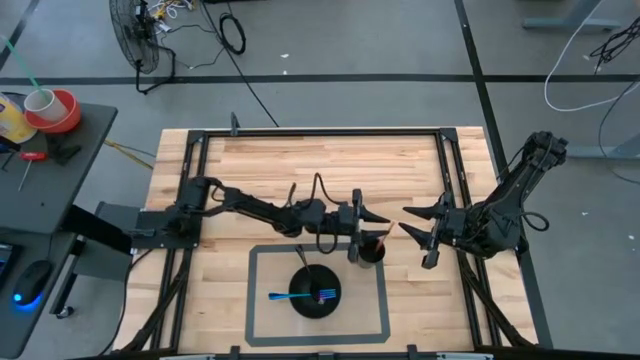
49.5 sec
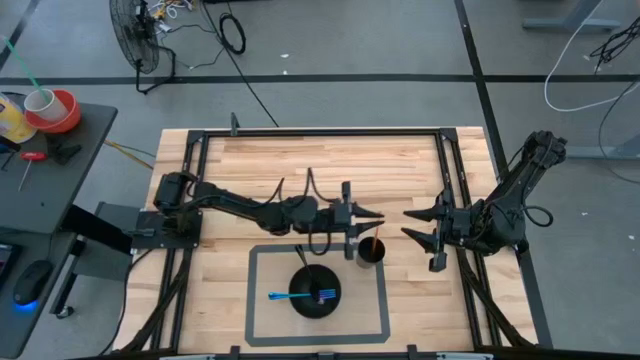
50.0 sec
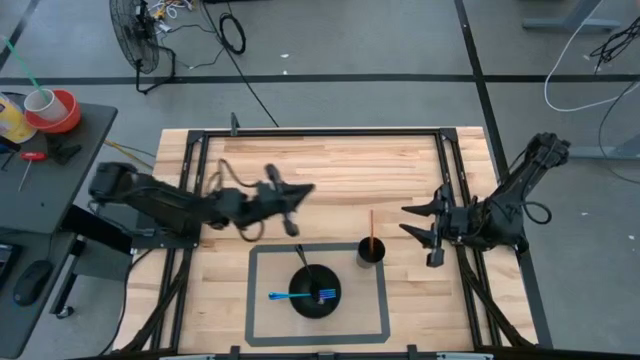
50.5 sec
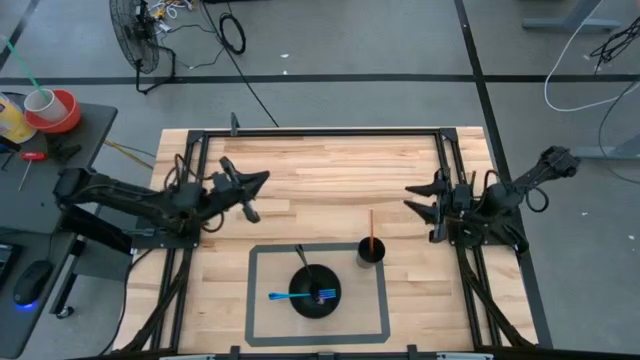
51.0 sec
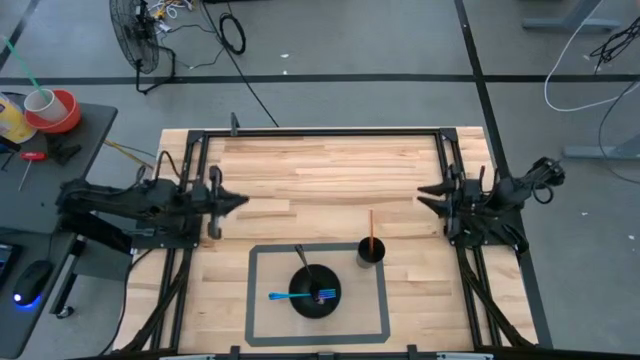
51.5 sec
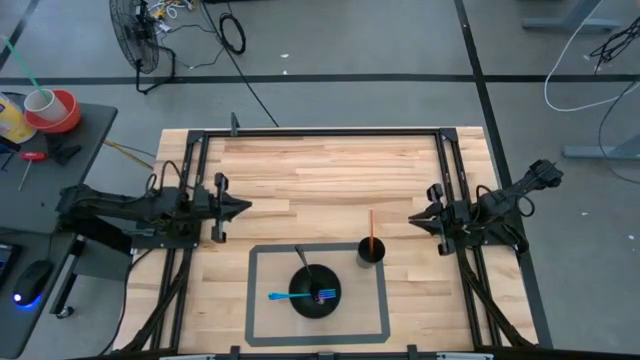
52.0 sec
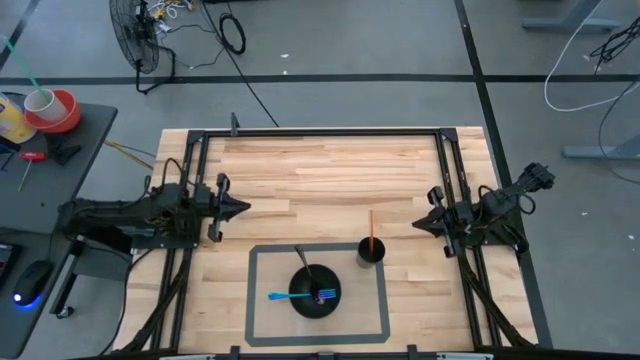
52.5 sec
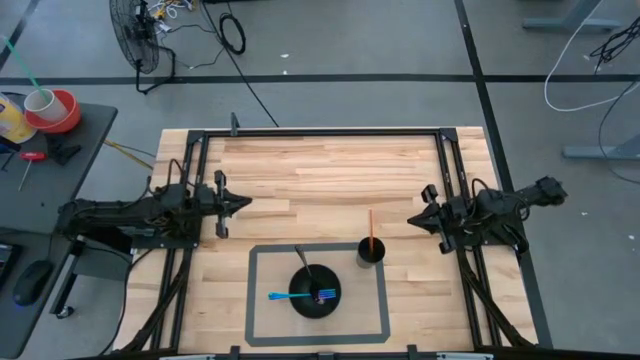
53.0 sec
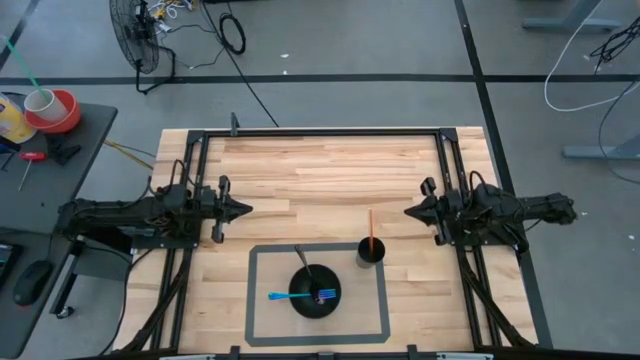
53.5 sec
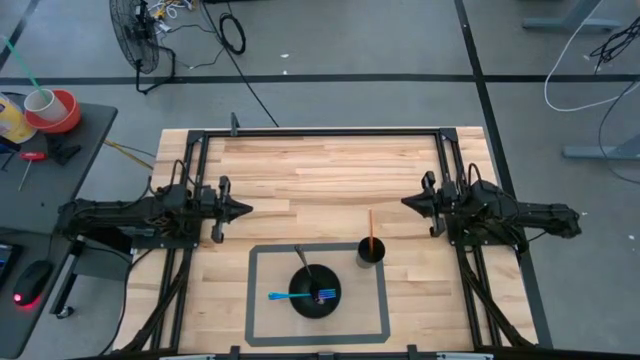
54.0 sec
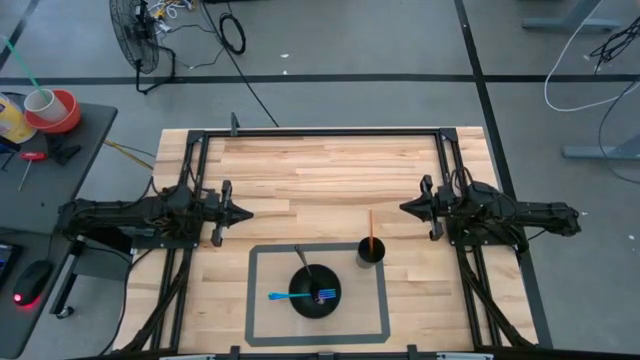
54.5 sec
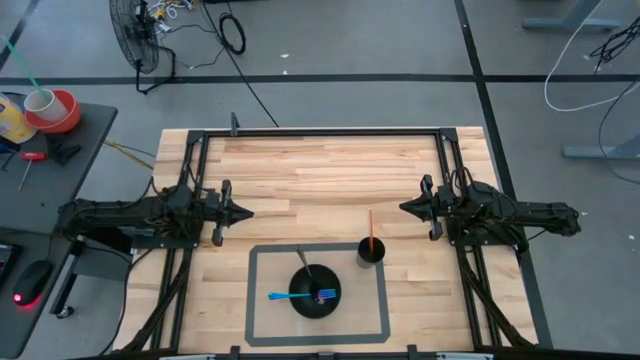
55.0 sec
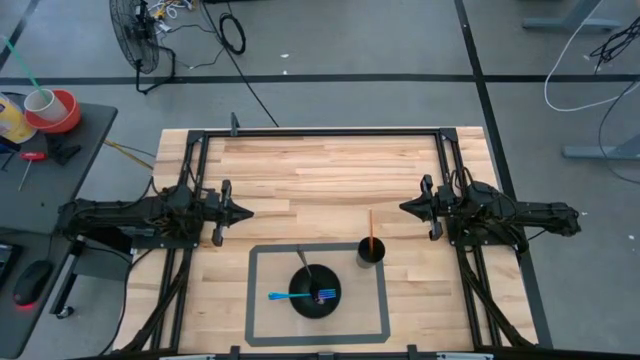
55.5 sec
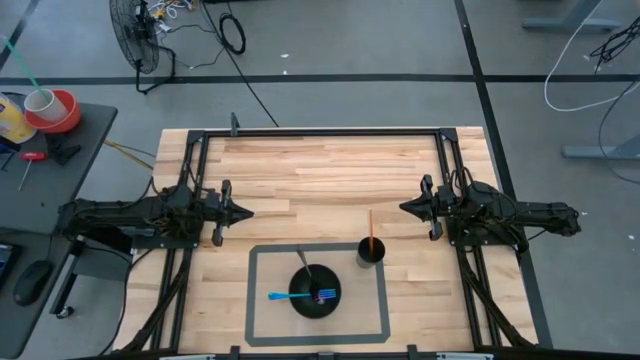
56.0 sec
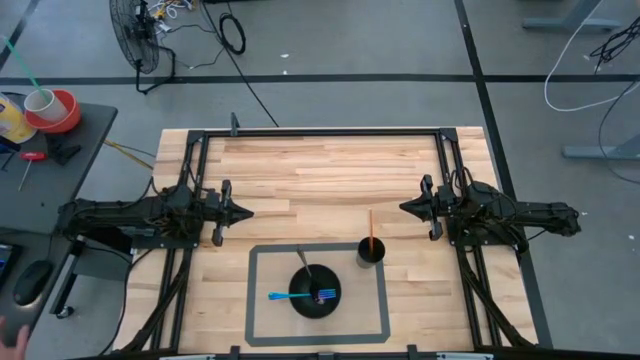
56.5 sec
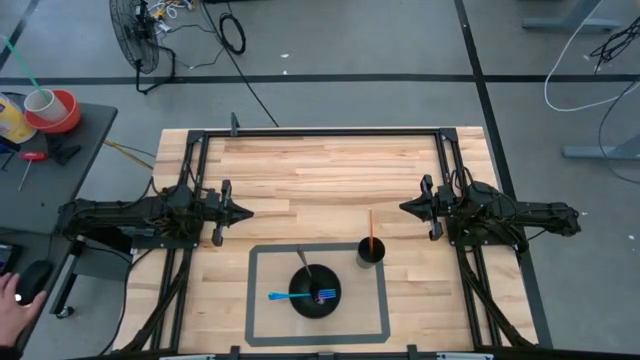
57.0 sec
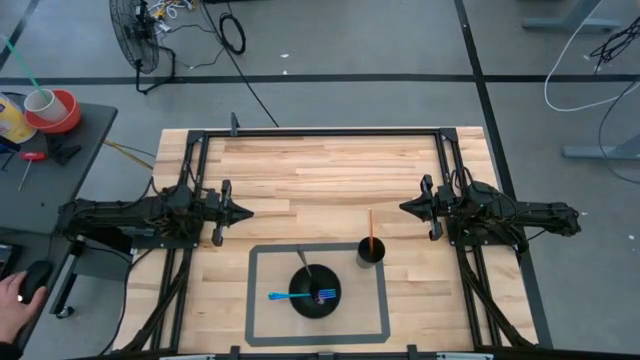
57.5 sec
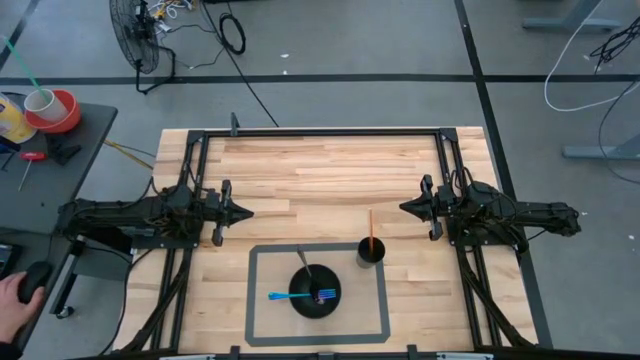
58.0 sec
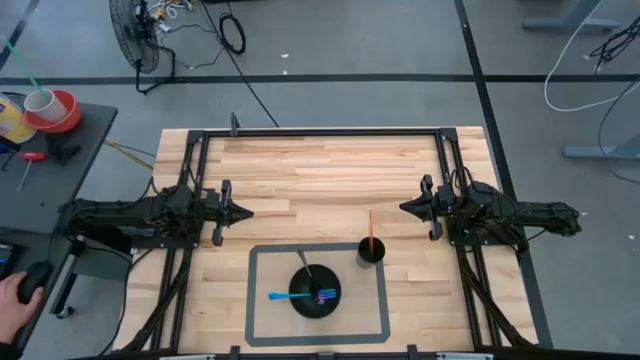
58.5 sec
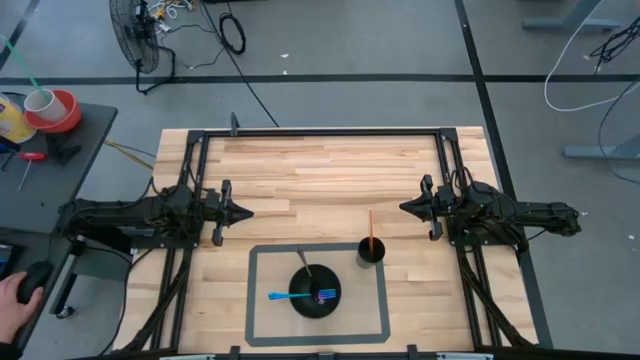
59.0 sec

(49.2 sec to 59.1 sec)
Task: Pick & Place Utensil
Return to Home Position

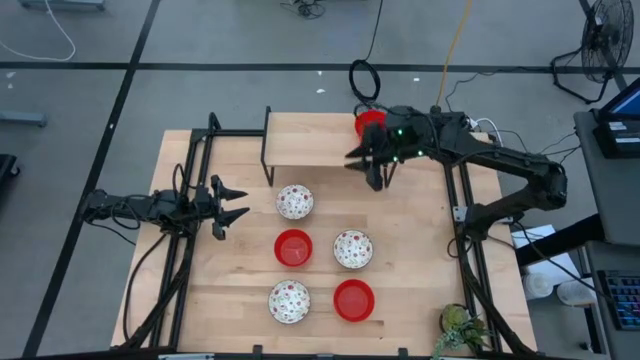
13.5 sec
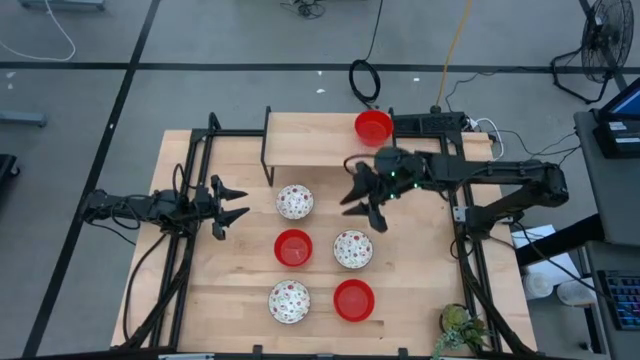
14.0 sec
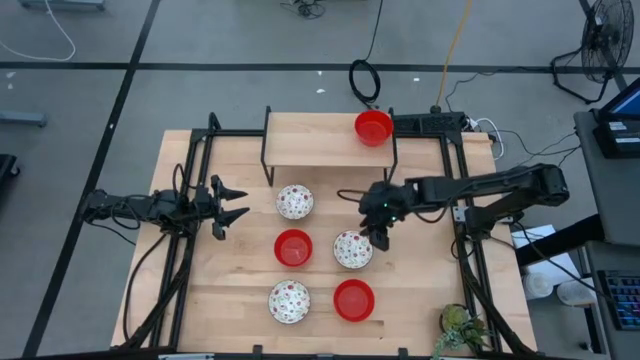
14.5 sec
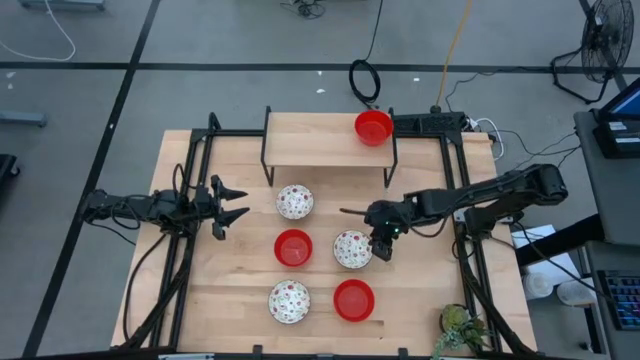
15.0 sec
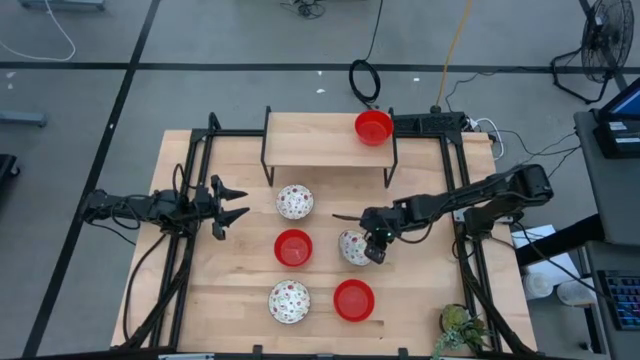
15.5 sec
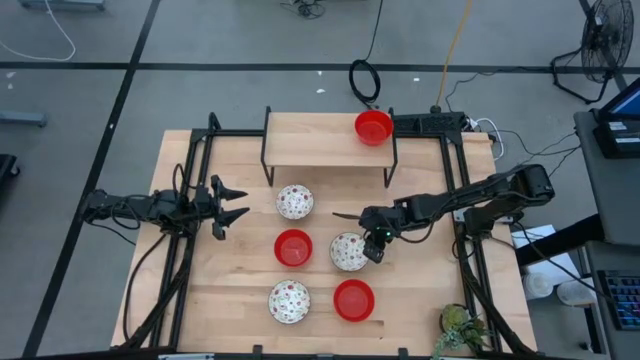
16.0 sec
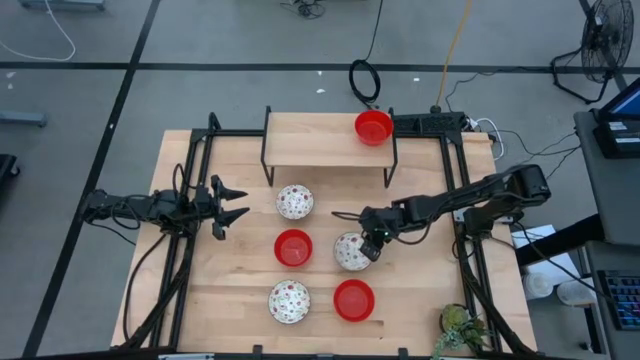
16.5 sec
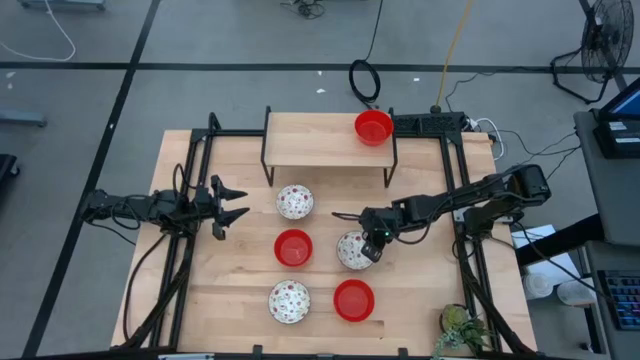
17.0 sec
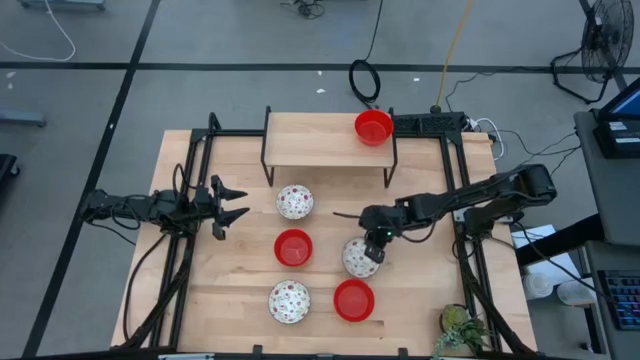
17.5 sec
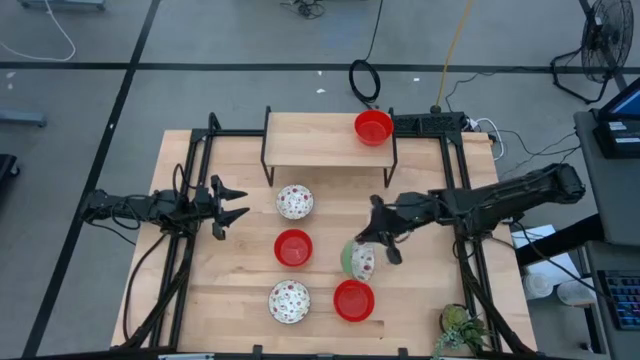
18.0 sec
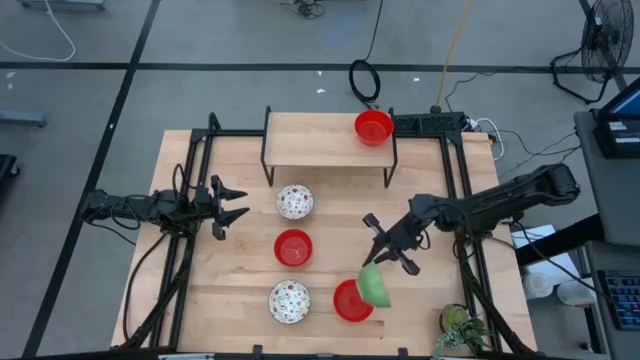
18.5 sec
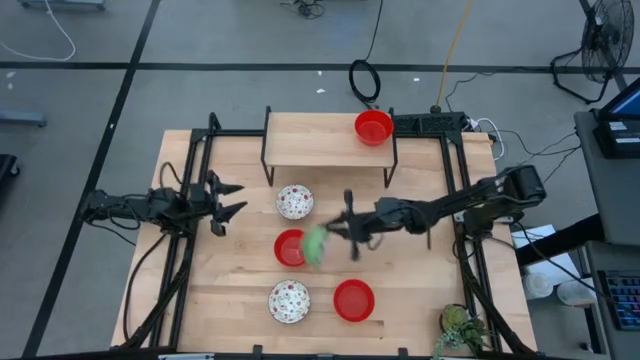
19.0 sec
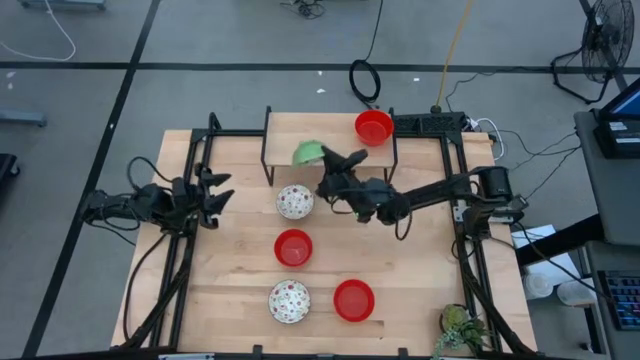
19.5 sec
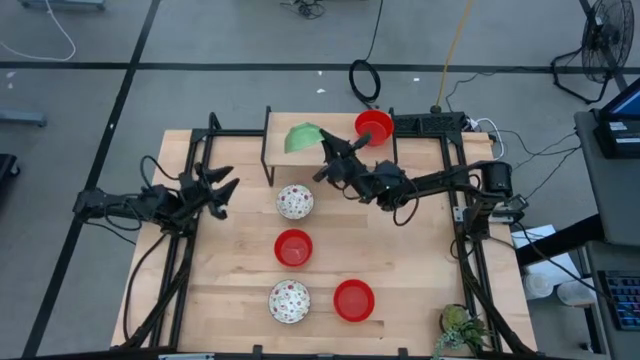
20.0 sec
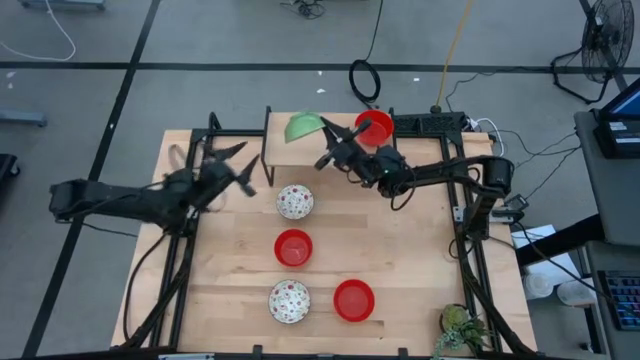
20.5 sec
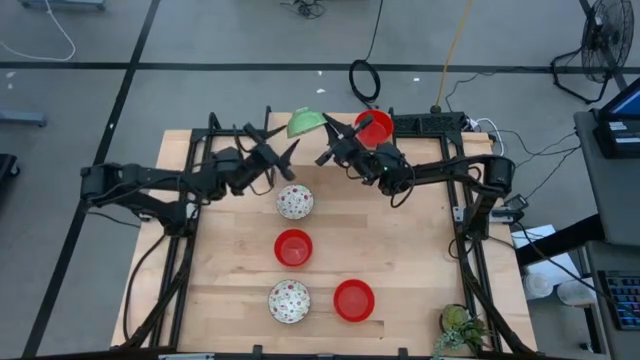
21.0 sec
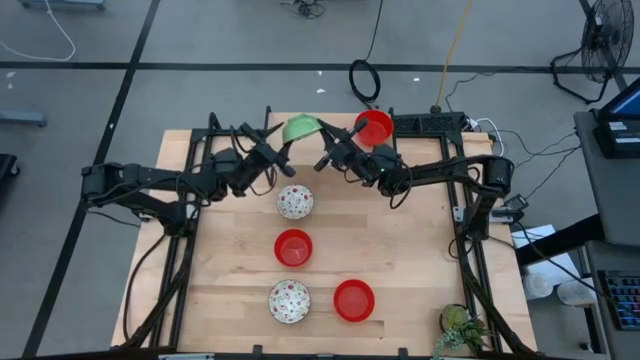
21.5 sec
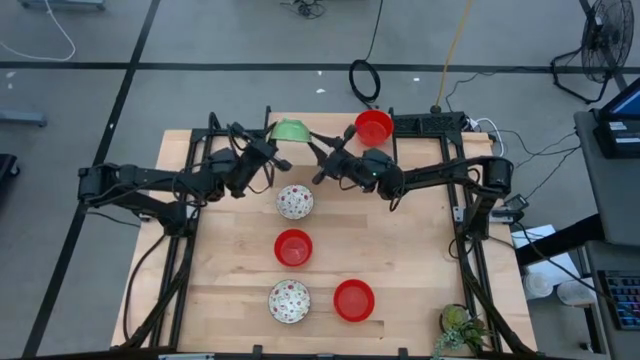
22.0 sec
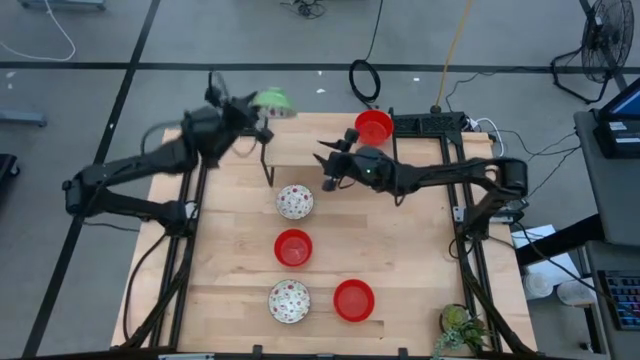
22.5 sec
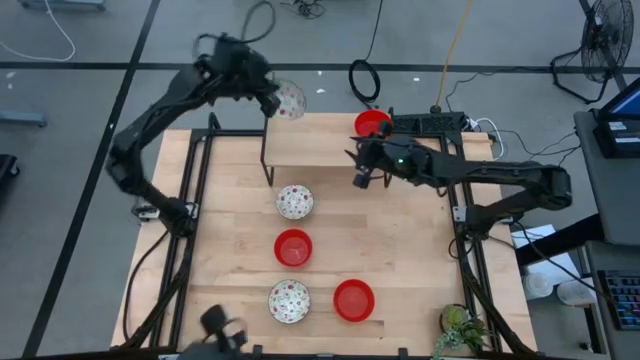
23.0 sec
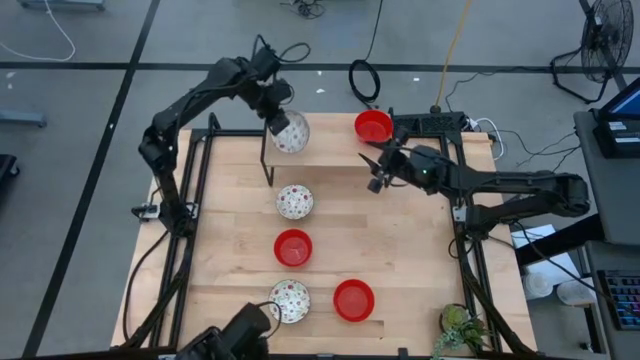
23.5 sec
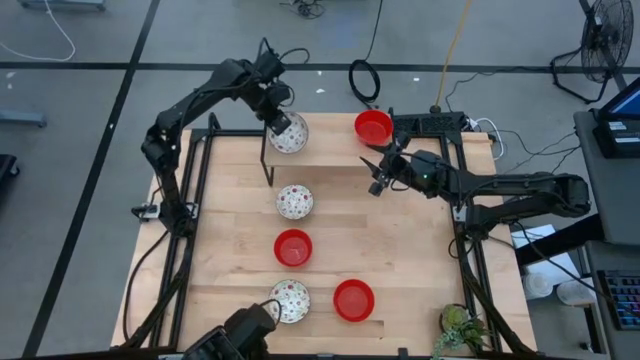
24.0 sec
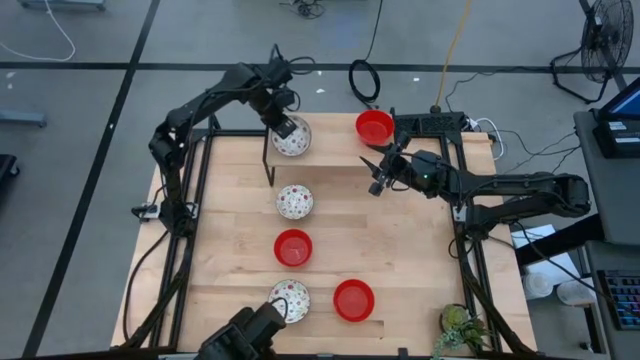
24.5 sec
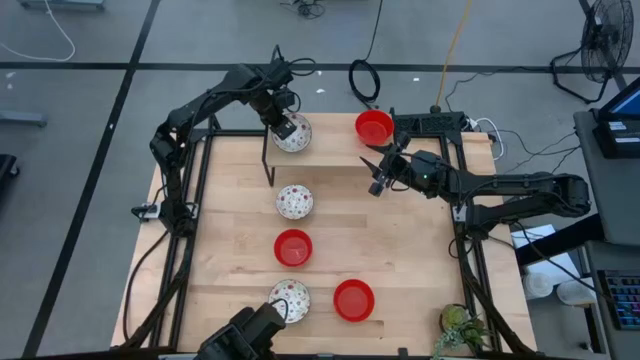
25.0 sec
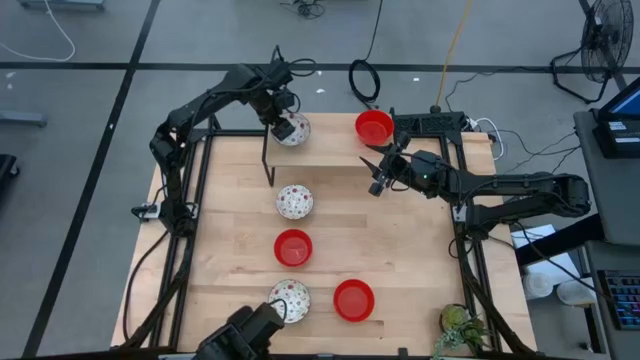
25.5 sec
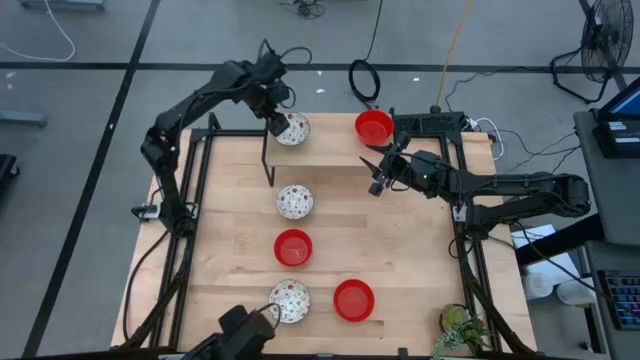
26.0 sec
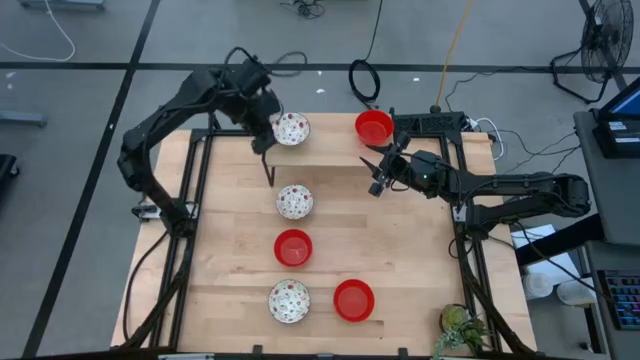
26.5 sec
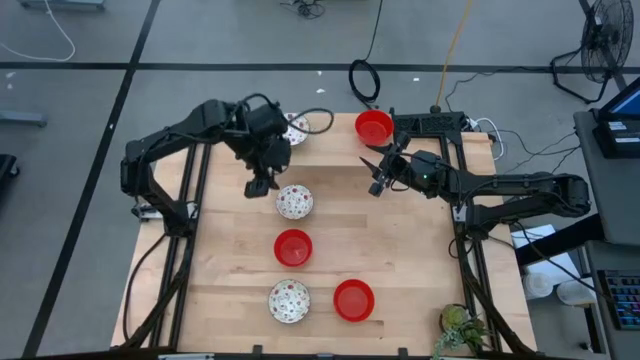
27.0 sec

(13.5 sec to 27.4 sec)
Task: Pick & Place Mini bowls
Put the middle white patterned bowl on the shelf
